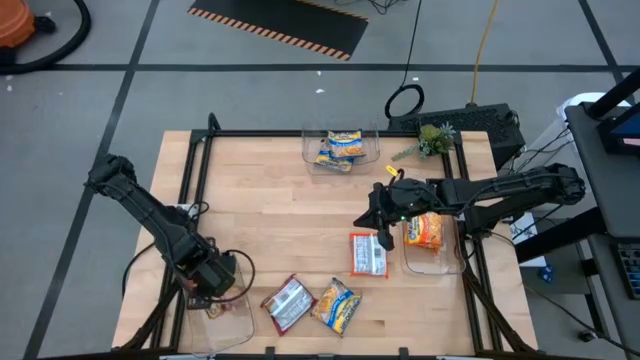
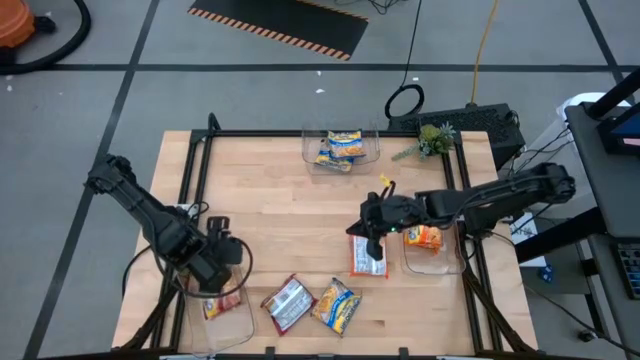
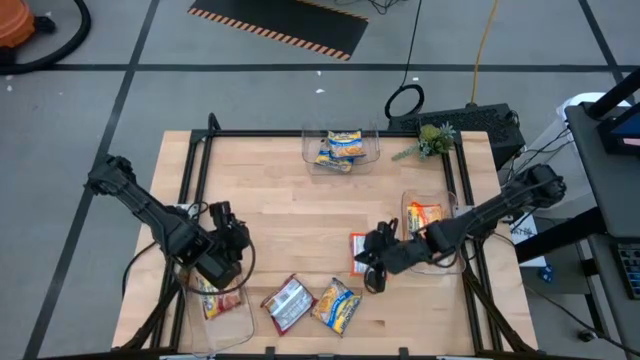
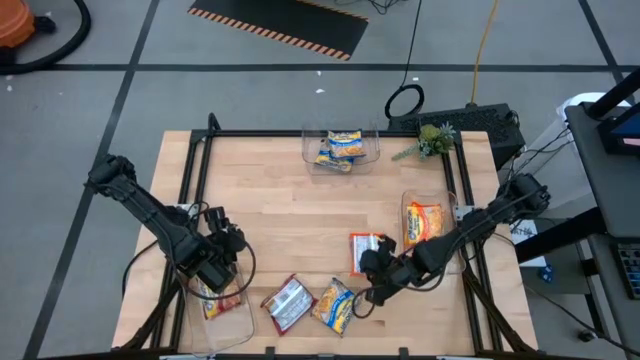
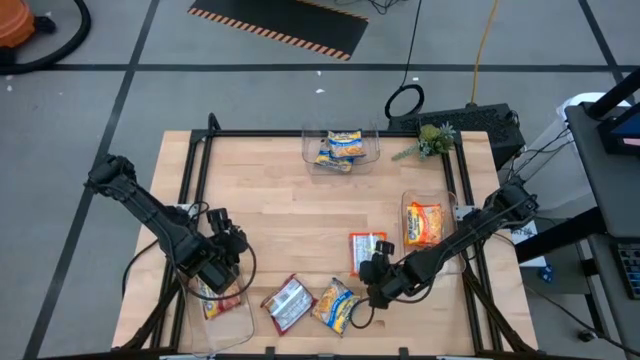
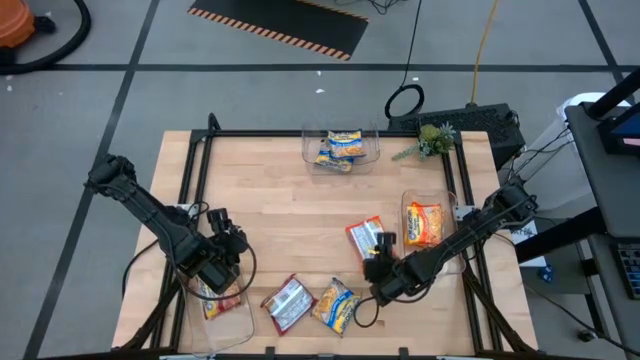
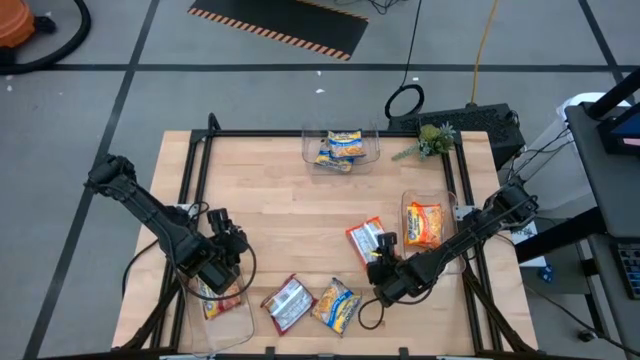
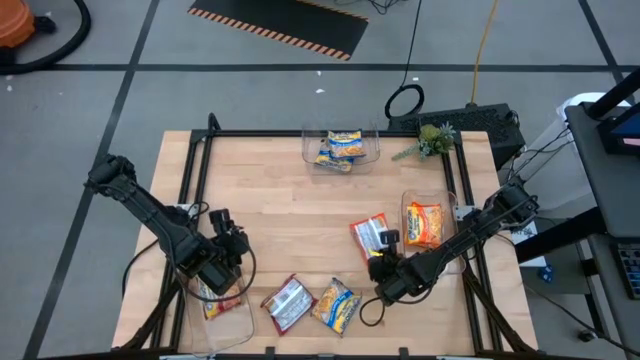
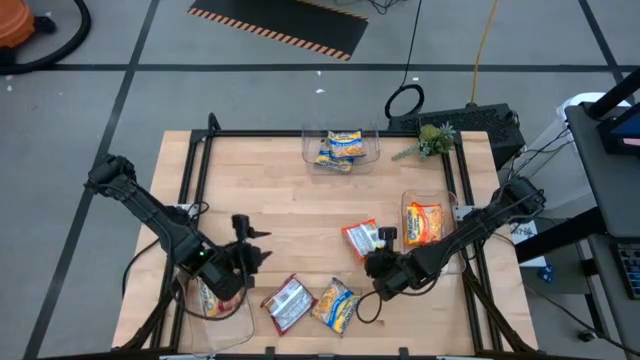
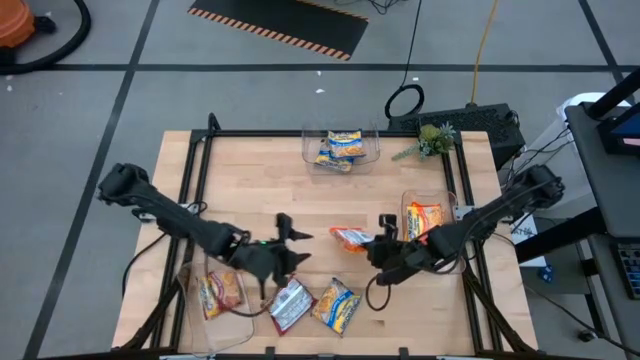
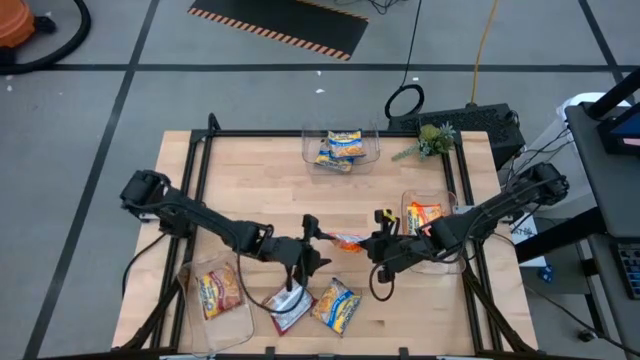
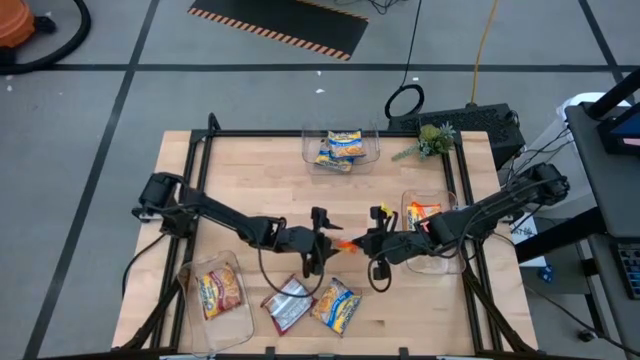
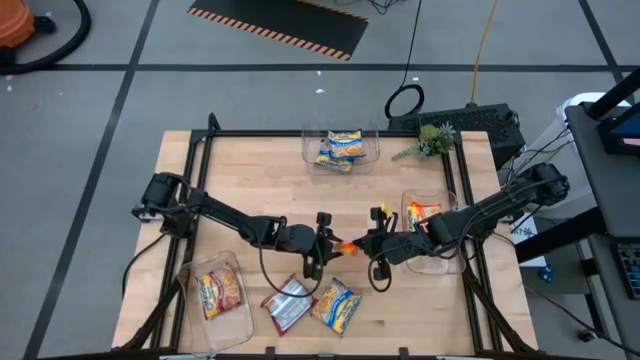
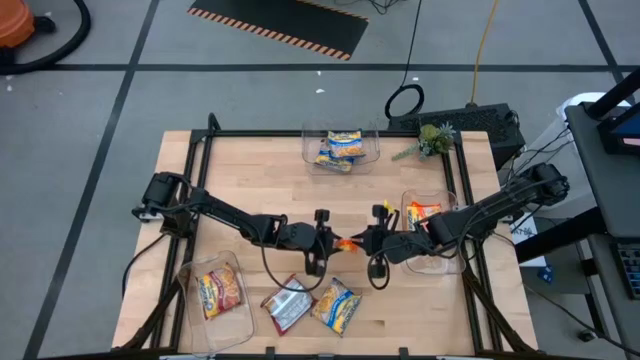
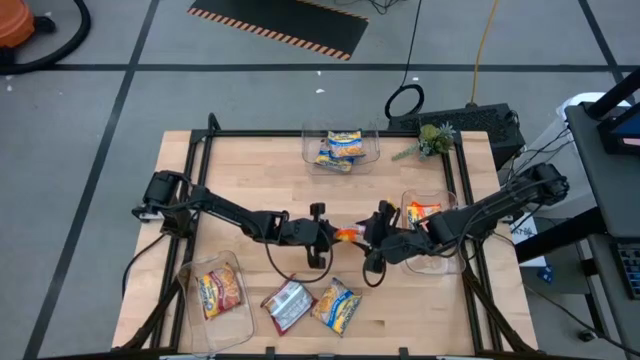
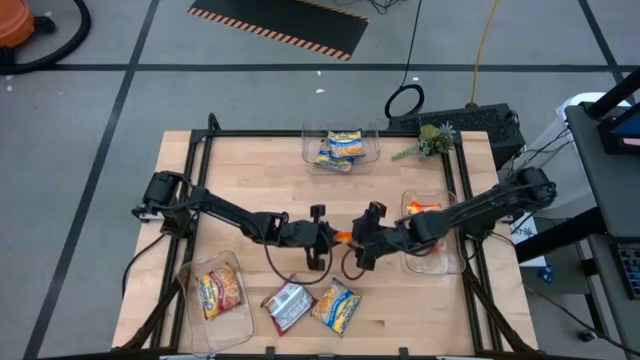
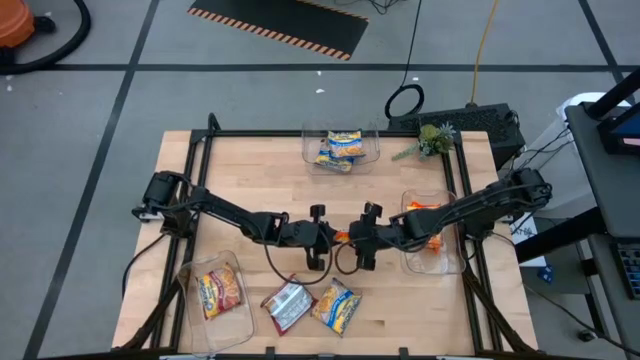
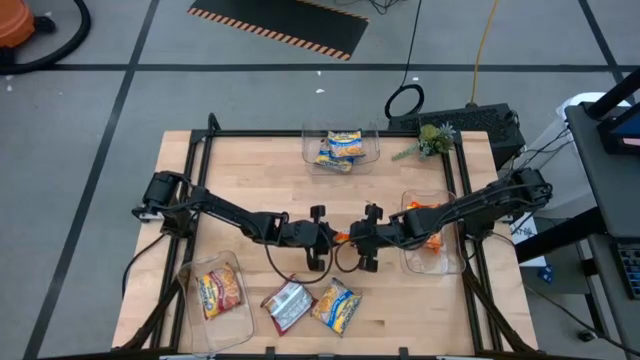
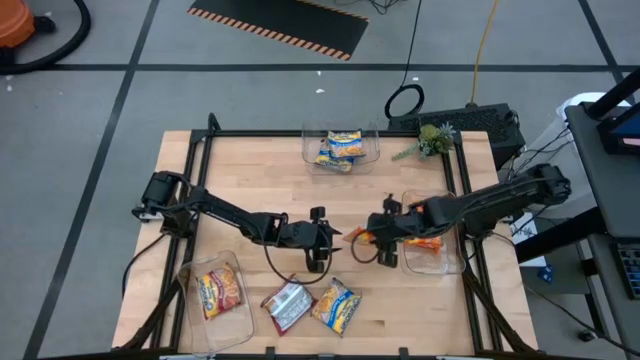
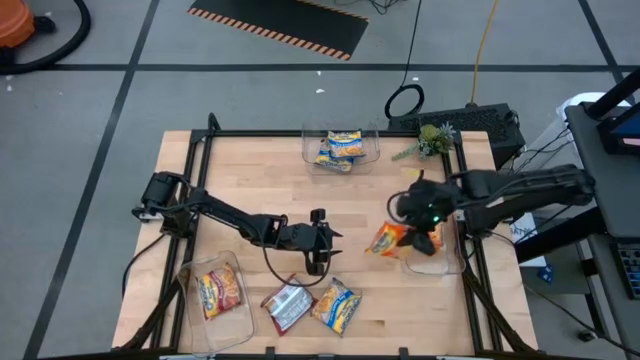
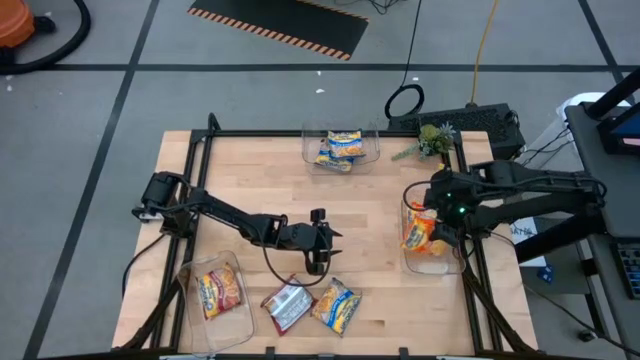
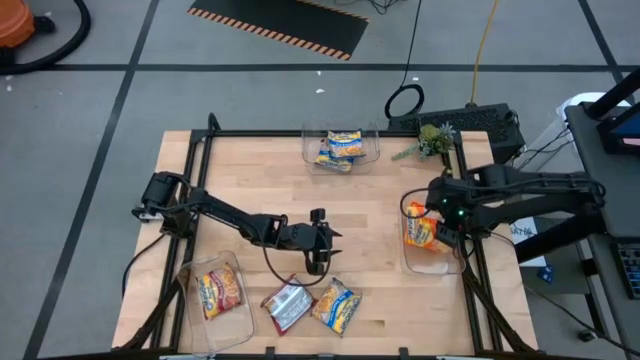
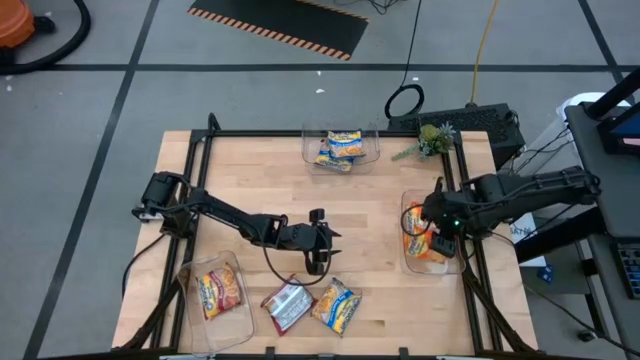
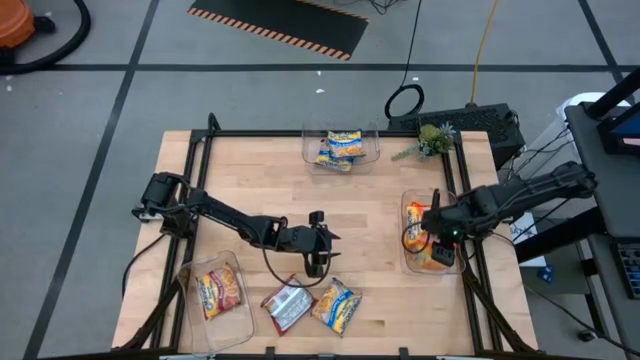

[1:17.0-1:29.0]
Task: Sort Maruchan noodles
Put the orange noodle pack into the right transparent bin

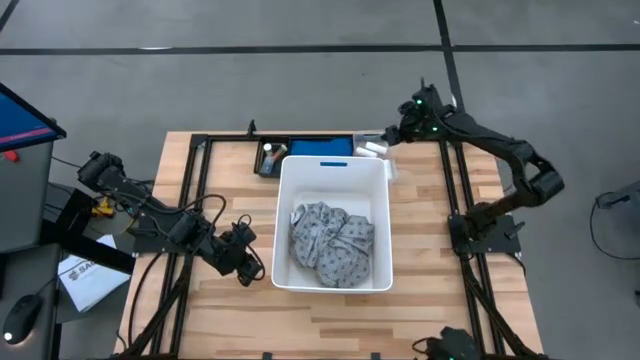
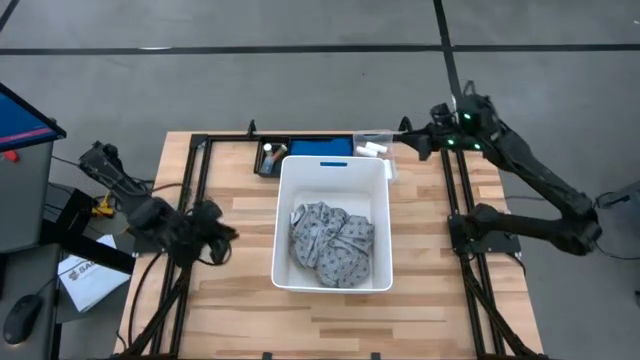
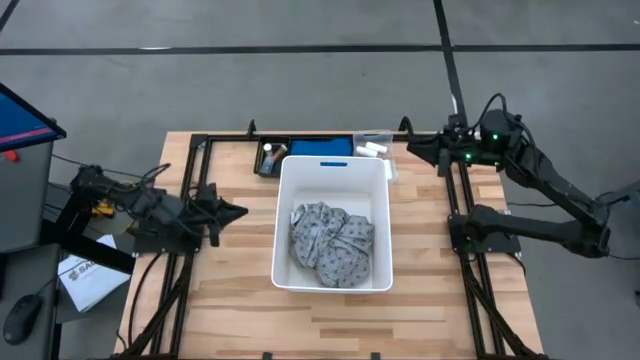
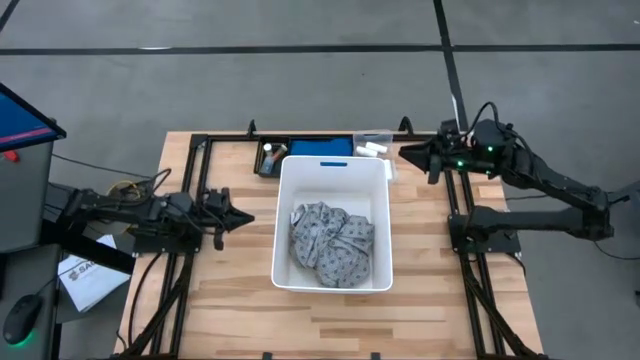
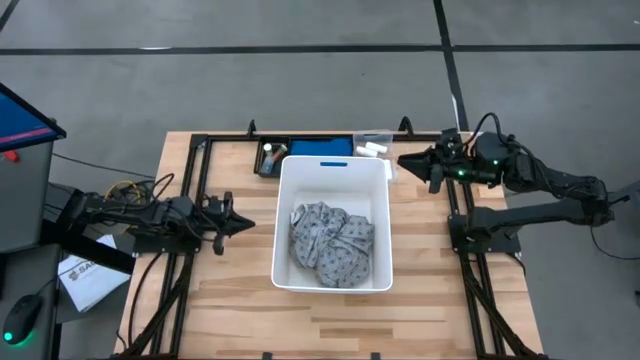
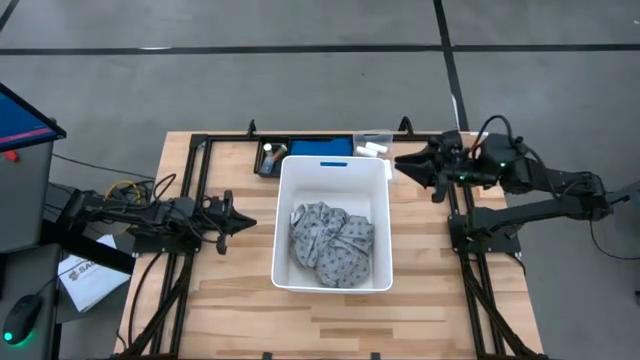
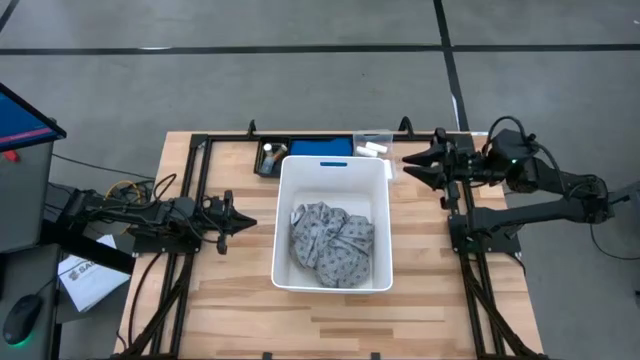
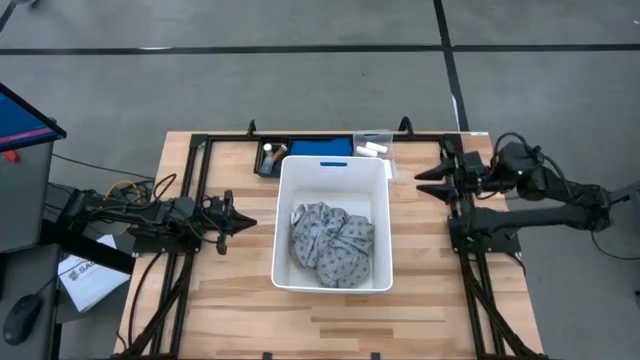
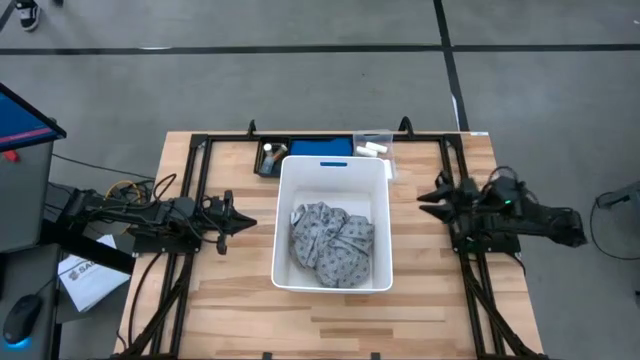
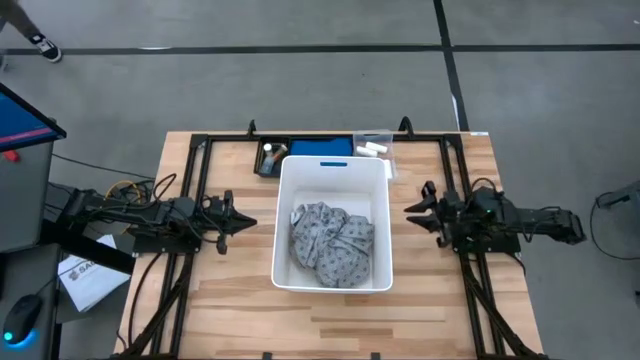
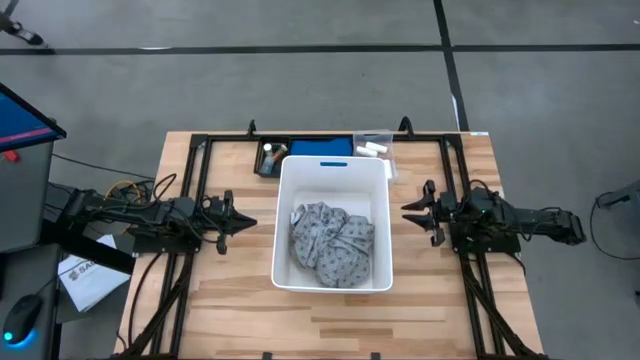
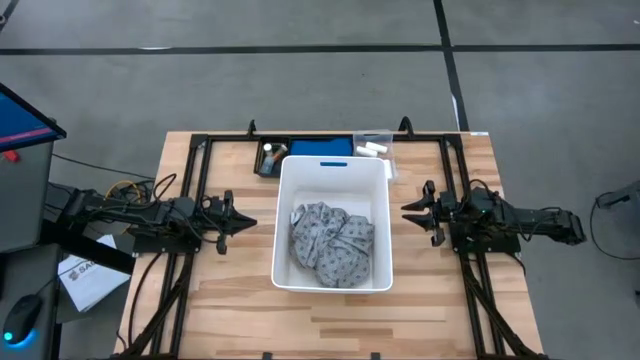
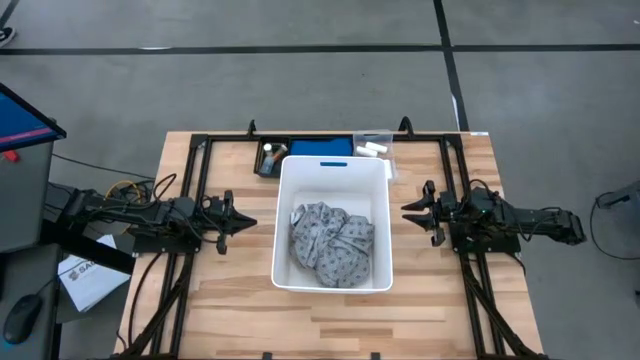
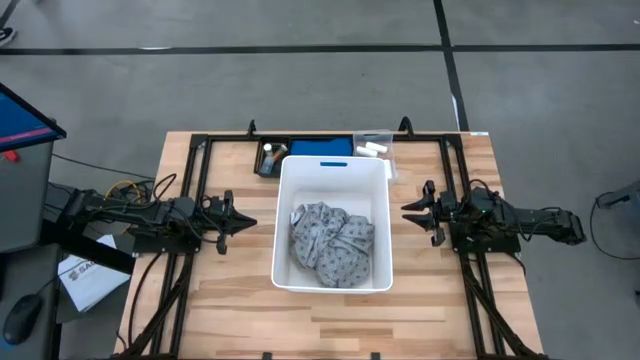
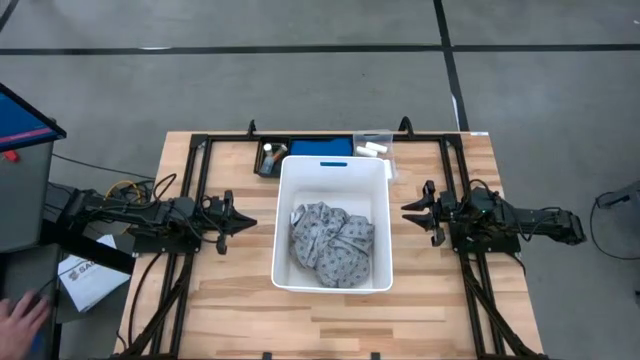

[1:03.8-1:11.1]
Task: Pick & place medical supplies in basket/bin
Return to Home Position

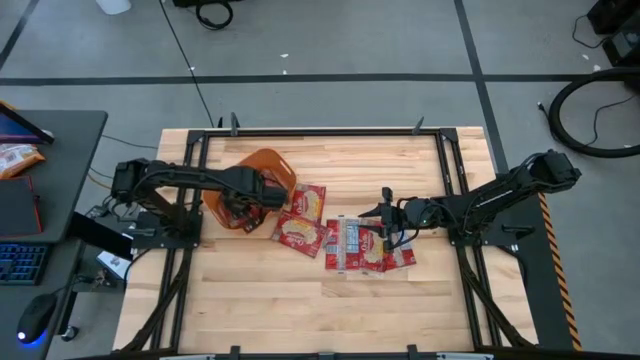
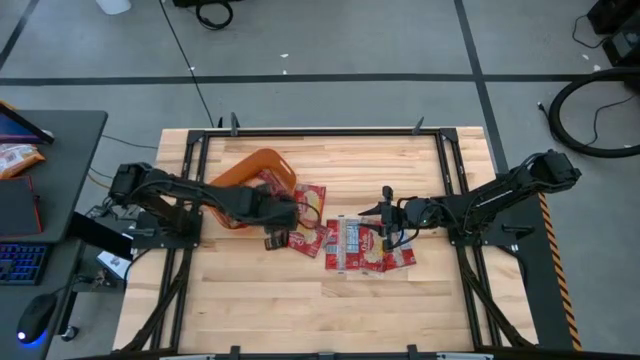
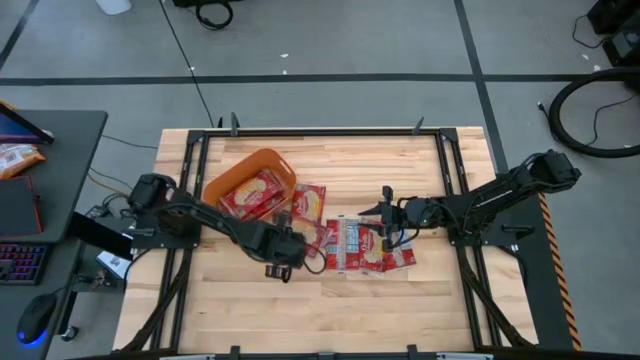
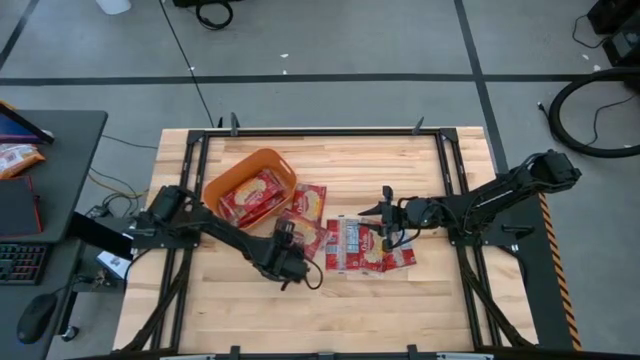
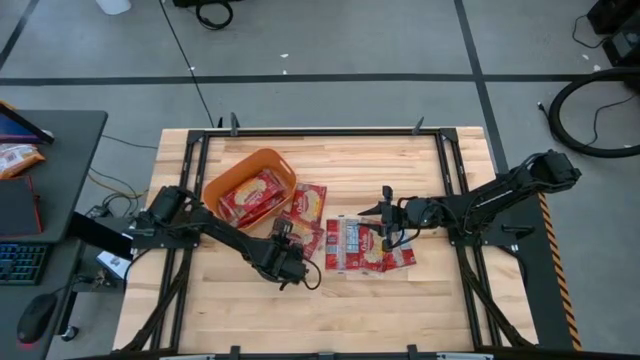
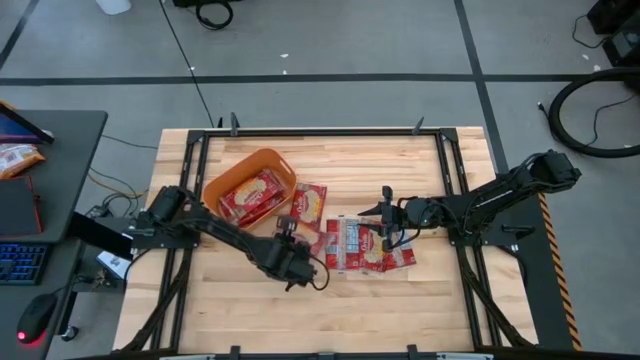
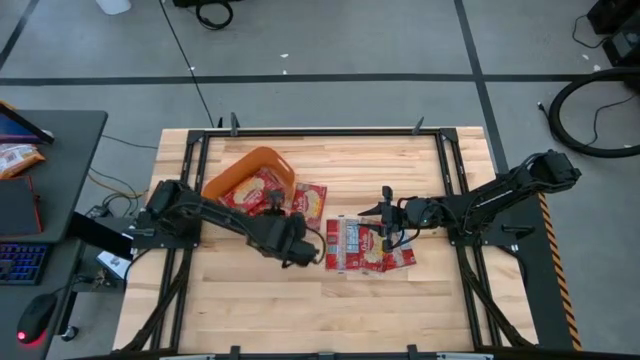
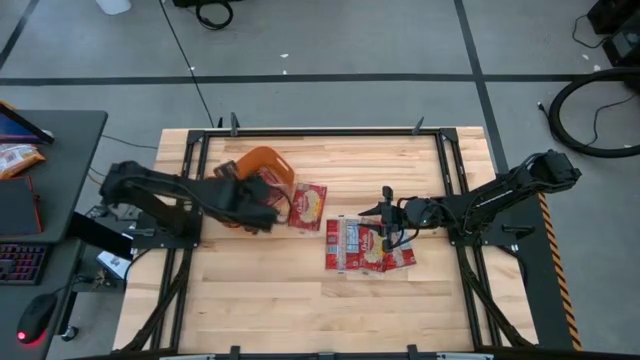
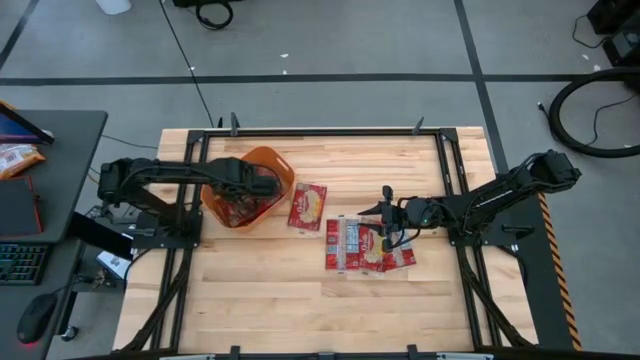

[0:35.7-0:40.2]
Task: Sort popcorn bags into baskets
Put the red popcorn bag into the orange bin
